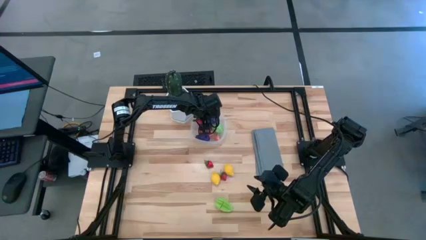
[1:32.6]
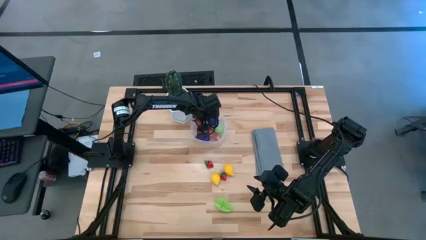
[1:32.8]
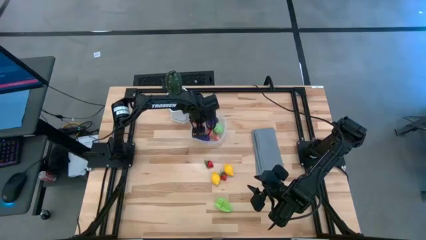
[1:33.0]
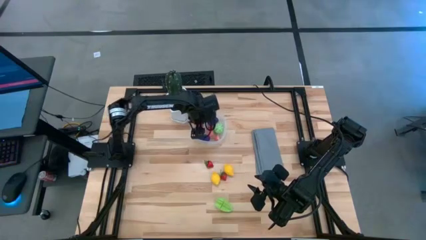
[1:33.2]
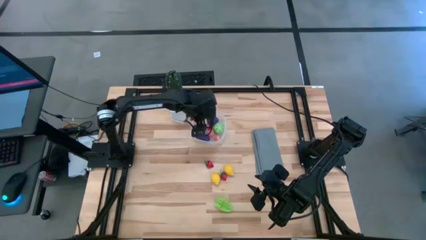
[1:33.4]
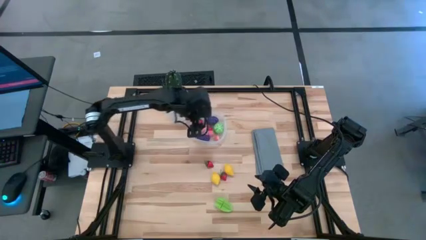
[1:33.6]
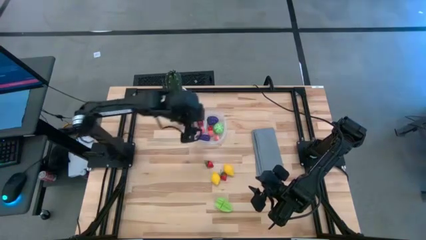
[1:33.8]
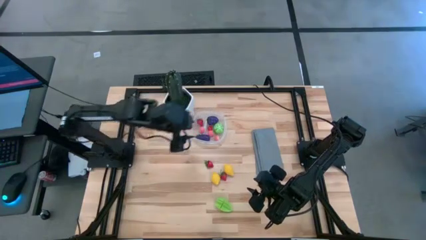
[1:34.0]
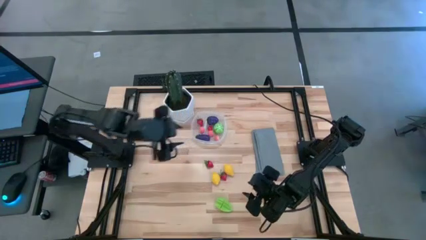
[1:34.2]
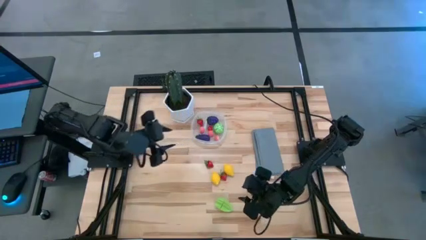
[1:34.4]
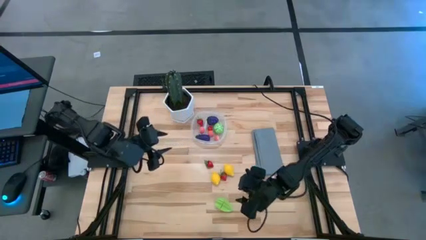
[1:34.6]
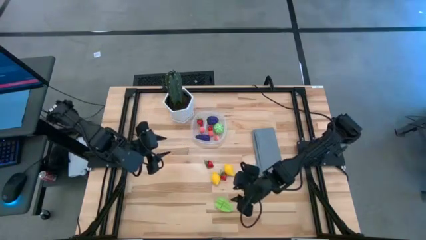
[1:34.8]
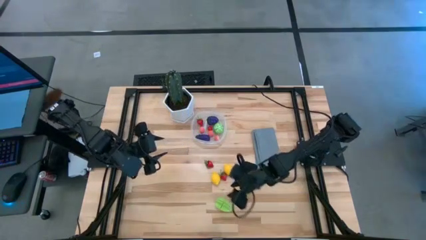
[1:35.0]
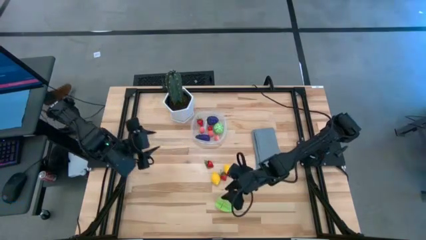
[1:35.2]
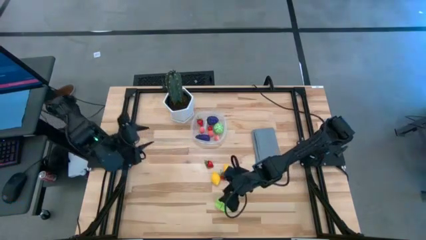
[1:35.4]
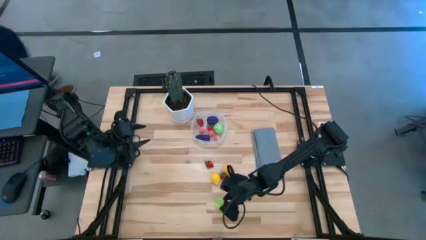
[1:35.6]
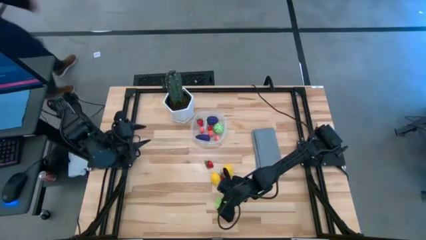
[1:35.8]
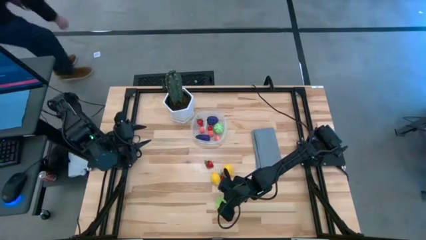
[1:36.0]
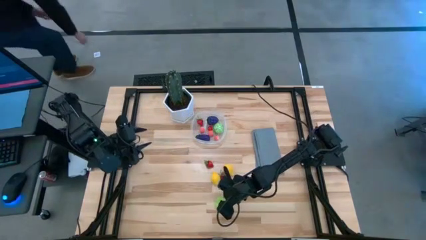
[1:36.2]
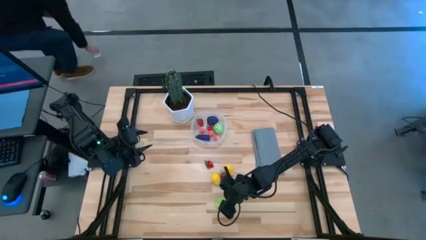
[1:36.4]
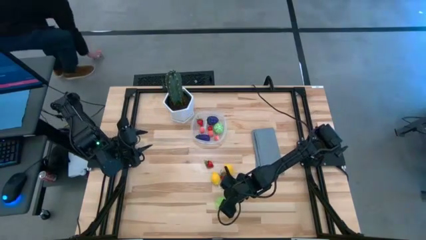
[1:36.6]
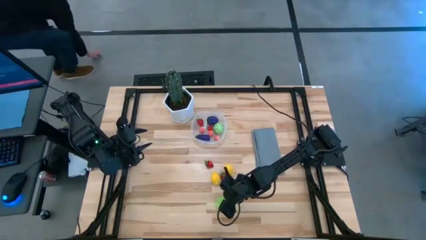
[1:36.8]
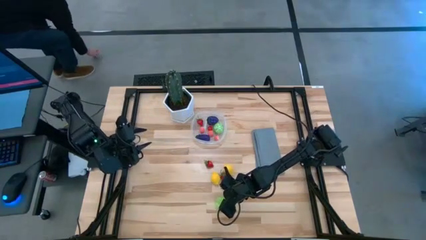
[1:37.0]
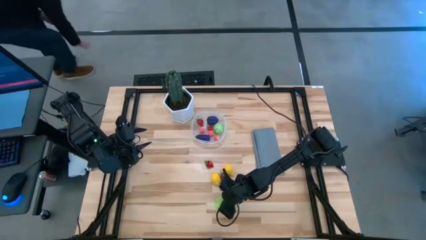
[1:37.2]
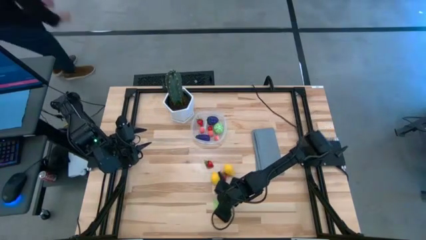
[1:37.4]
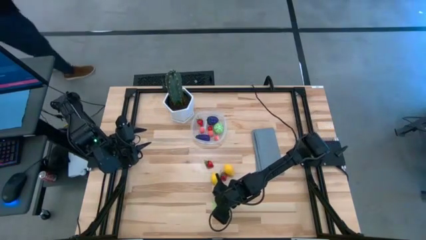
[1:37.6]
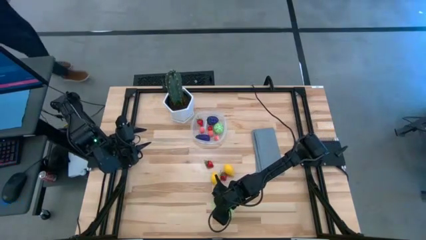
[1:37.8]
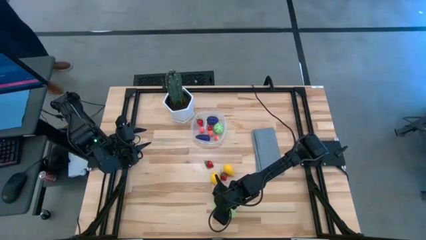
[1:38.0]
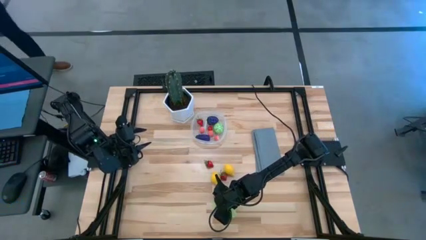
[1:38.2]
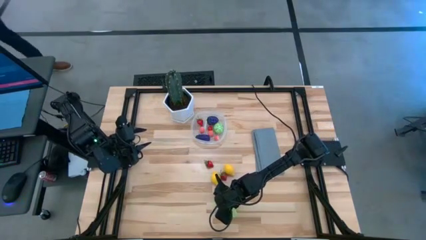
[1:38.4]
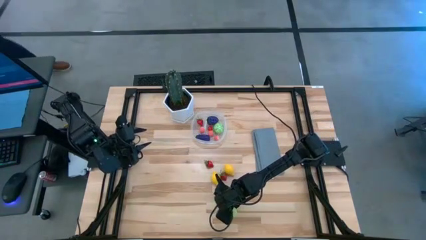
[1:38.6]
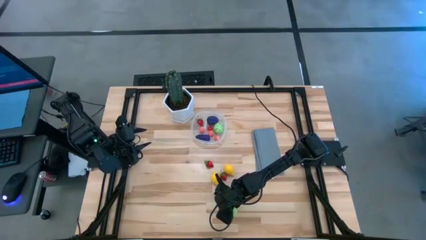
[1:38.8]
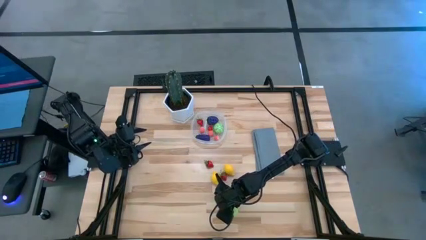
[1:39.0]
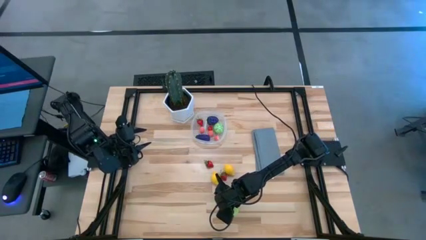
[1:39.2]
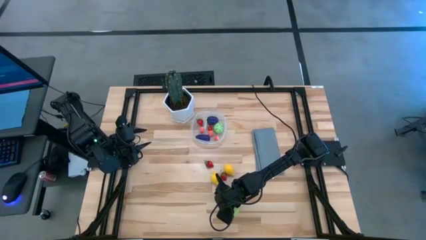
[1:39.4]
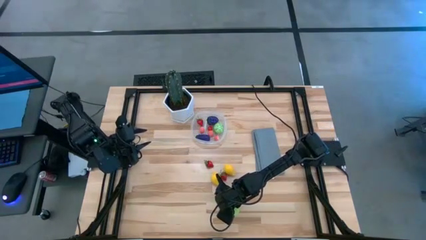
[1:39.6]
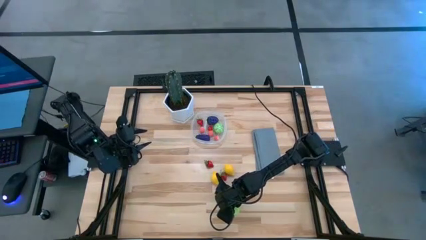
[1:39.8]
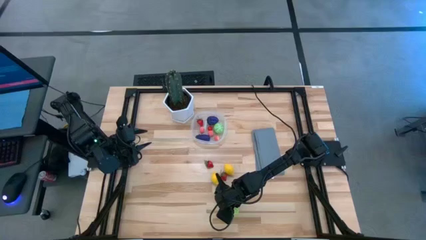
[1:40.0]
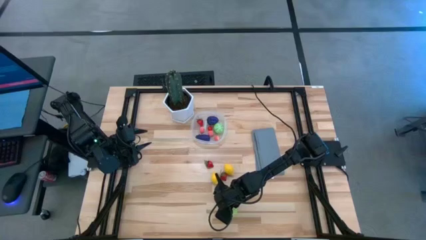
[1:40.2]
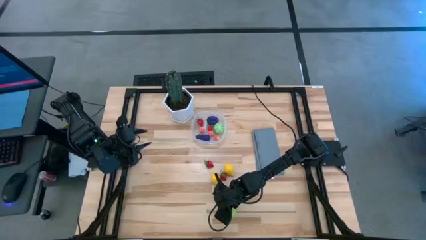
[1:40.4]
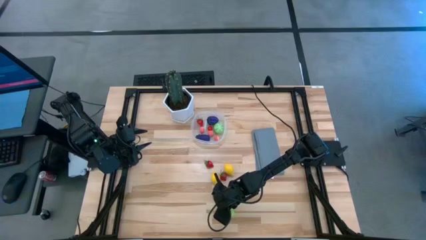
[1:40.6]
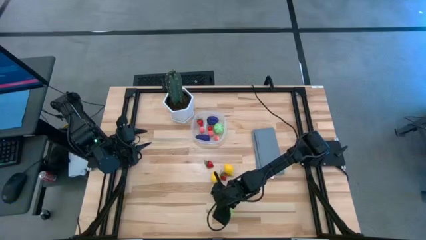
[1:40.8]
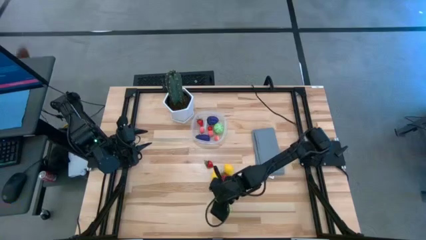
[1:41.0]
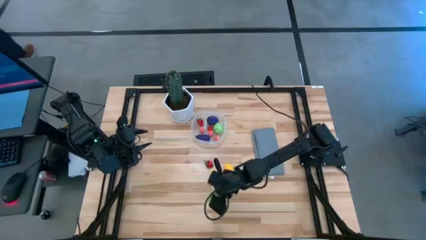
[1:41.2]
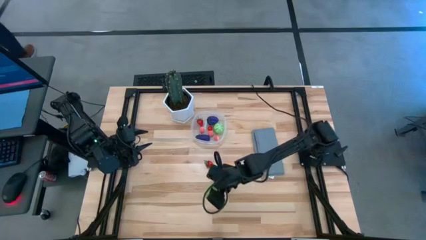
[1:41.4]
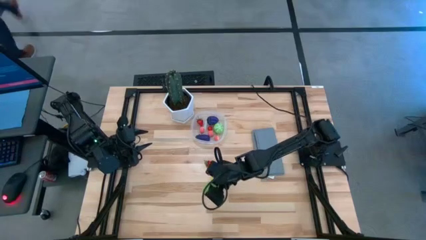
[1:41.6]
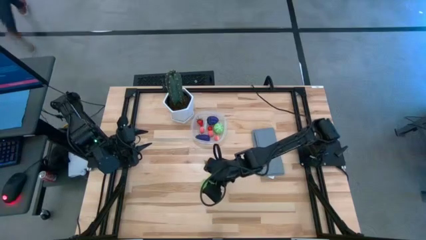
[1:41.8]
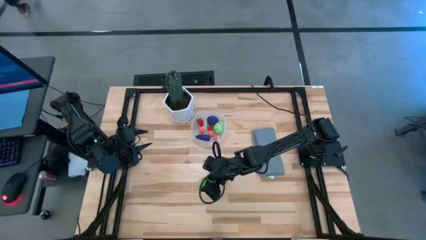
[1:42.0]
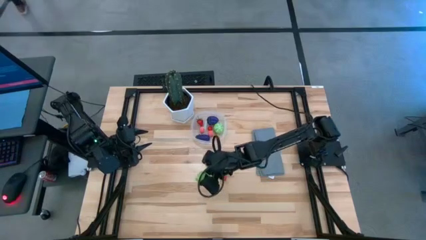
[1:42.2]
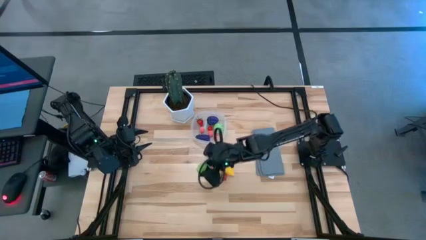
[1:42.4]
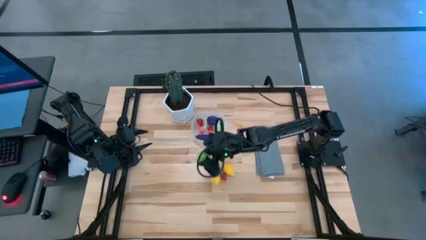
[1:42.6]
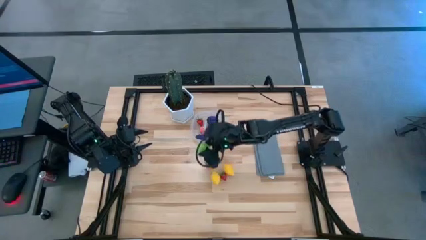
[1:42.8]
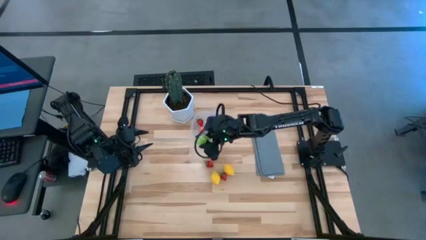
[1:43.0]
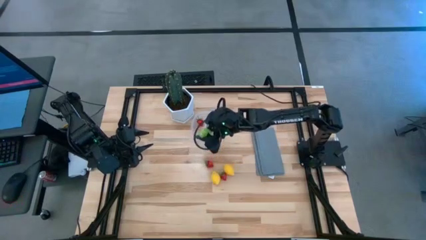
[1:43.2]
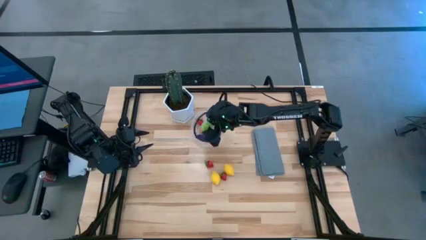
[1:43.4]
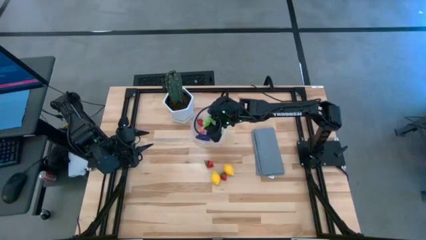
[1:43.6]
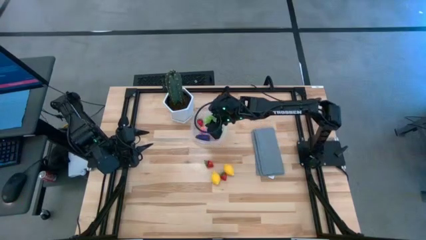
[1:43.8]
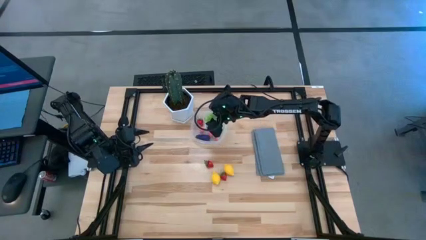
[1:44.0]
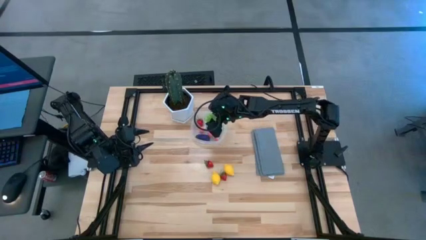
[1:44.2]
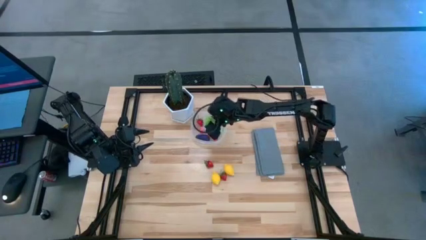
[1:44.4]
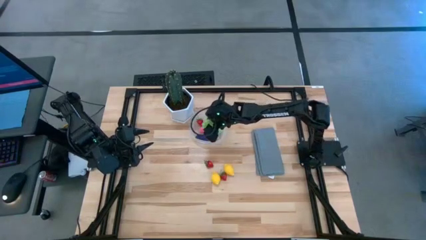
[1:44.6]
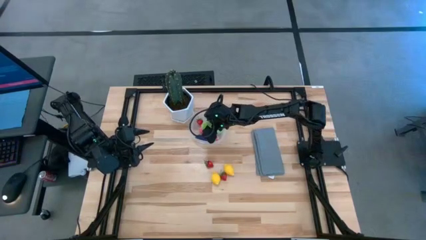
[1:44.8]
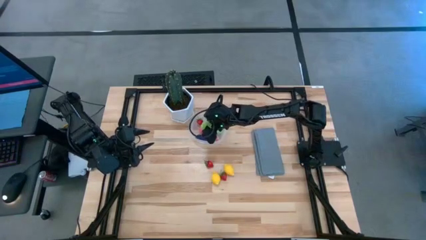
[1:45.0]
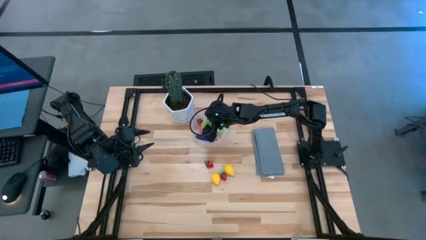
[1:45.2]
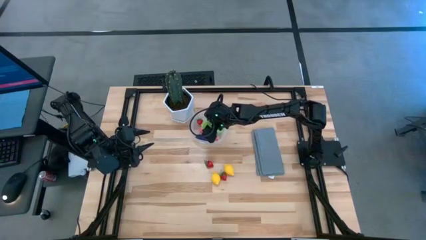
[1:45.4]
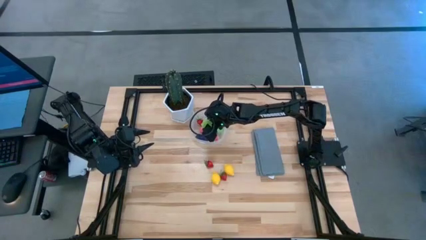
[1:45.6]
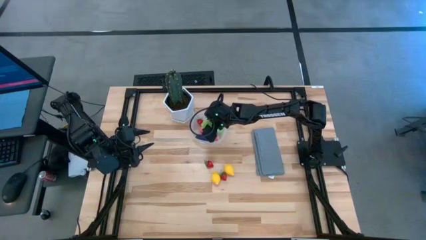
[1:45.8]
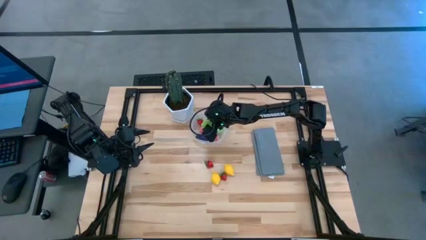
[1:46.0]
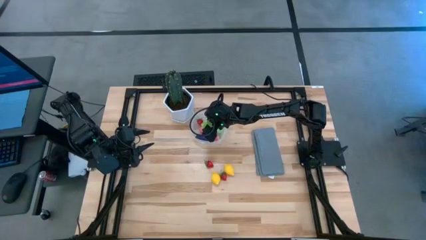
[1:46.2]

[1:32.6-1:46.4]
Task: Pick and placing Produce into tupperware
Put the star fruit into the transparent bin

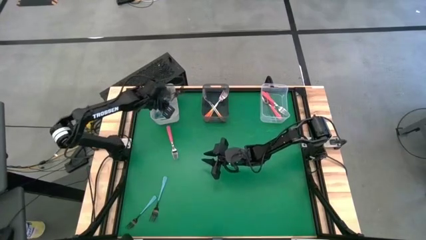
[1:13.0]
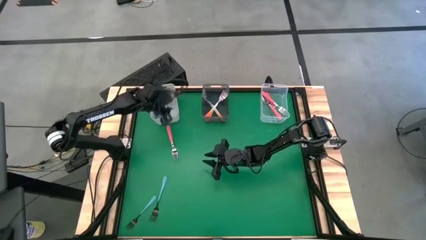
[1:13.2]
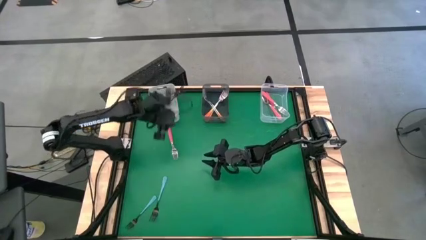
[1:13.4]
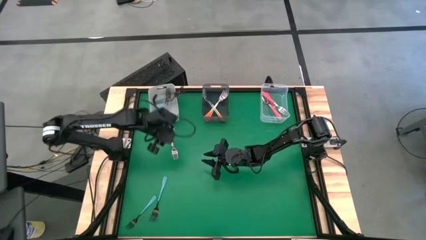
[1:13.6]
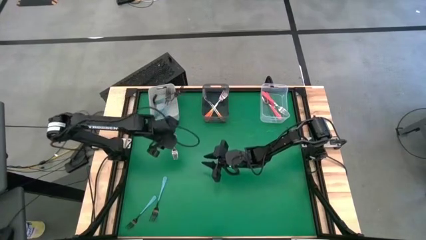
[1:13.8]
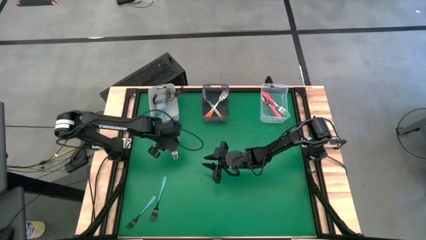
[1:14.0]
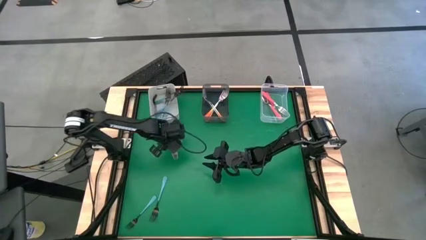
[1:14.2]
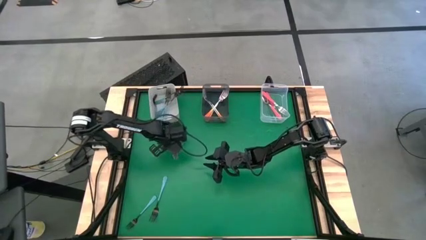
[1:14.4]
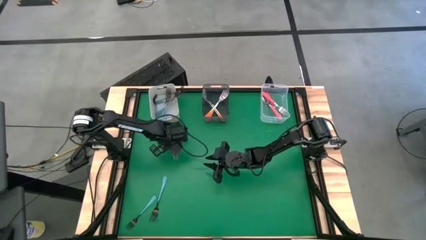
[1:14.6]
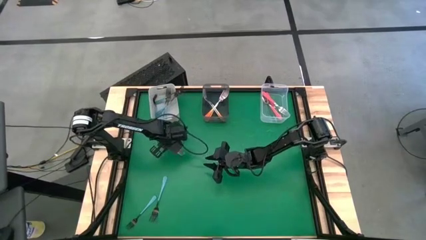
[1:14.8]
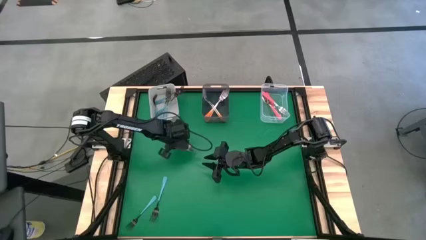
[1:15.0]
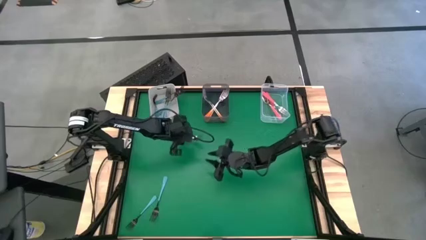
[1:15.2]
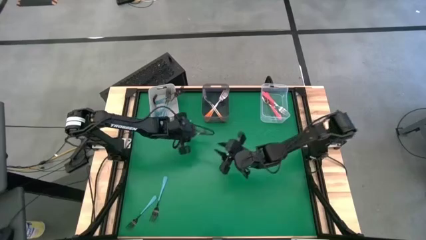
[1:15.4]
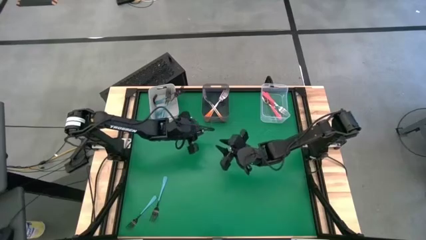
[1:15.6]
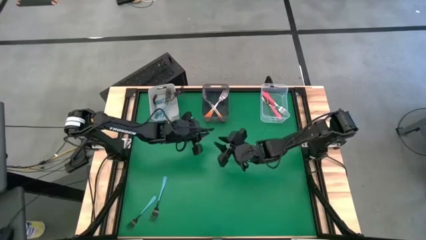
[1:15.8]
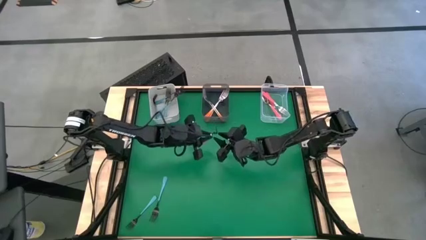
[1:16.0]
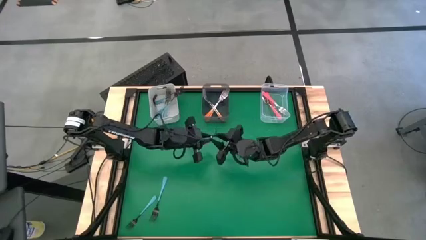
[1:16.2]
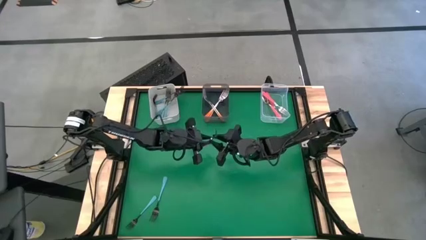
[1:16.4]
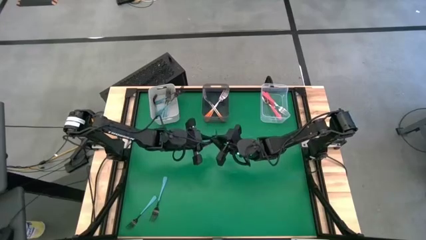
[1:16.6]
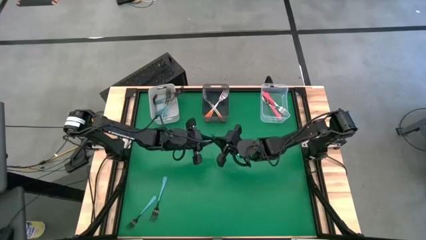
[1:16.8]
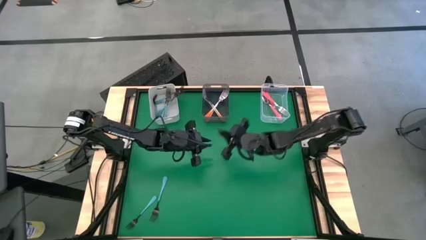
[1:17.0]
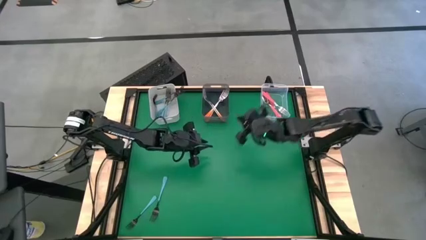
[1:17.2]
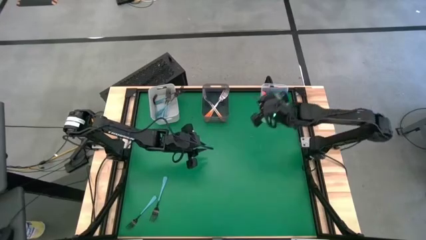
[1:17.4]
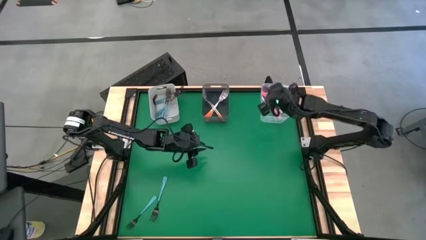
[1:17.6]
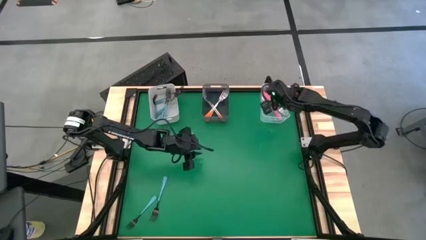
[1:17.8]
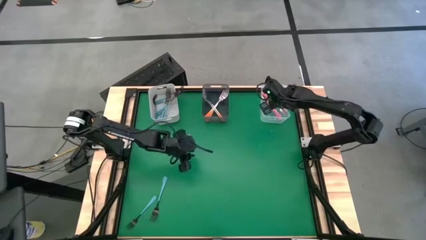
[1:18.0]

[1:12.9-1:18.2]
Task: Sort silverware by color (type)
Put the pink fork into the transparent bin
